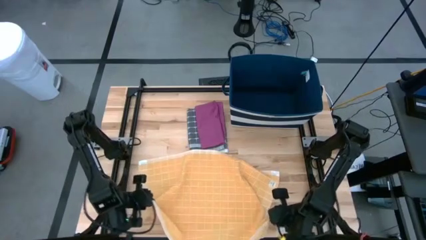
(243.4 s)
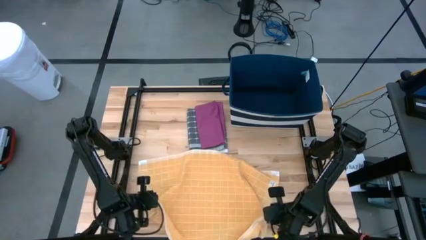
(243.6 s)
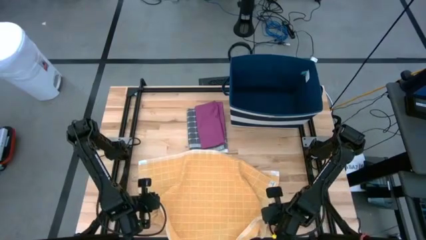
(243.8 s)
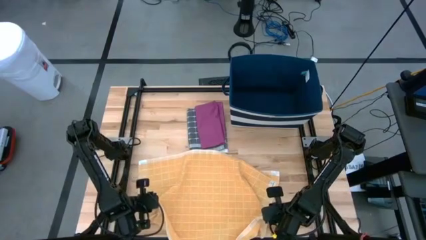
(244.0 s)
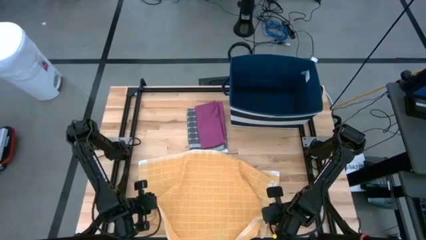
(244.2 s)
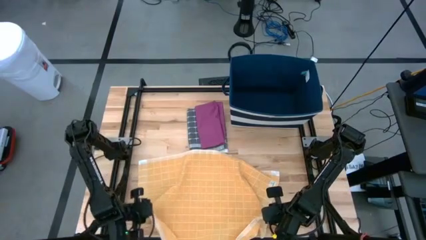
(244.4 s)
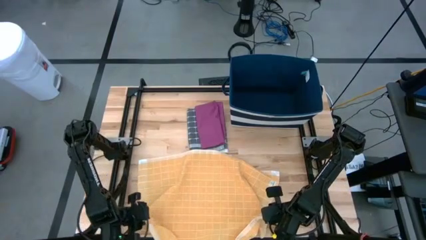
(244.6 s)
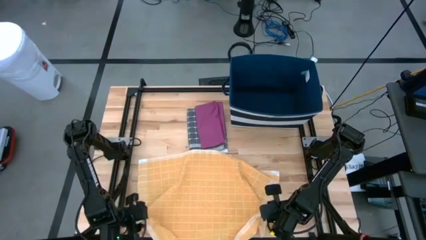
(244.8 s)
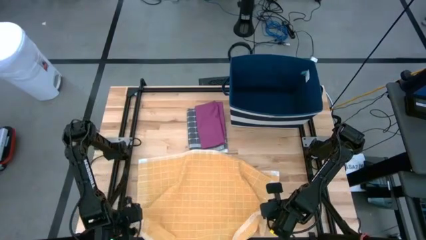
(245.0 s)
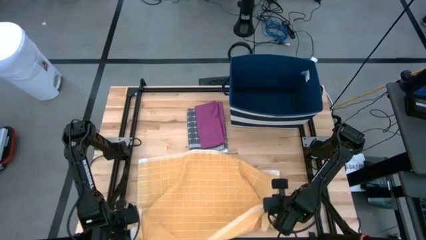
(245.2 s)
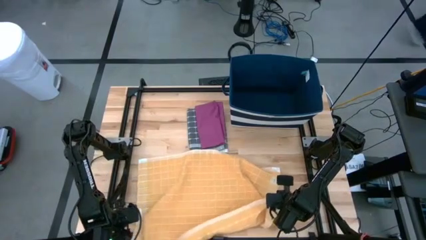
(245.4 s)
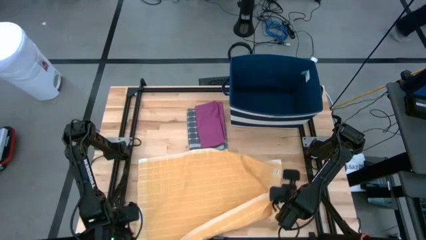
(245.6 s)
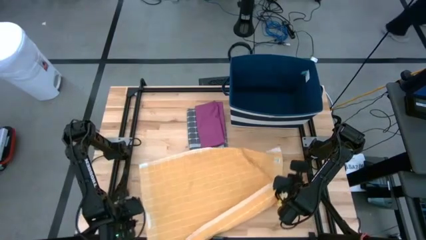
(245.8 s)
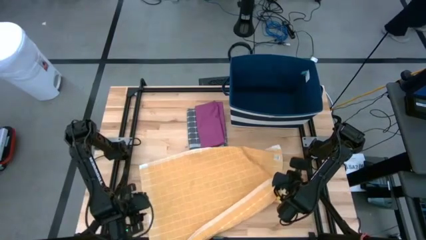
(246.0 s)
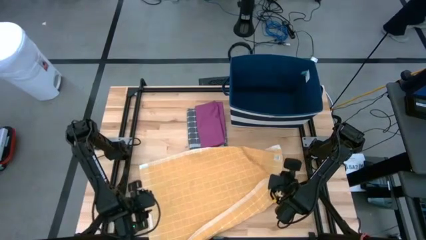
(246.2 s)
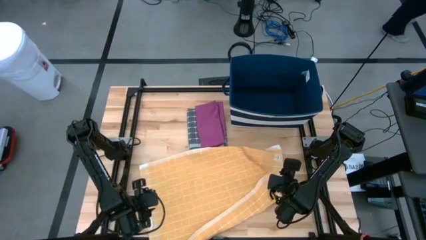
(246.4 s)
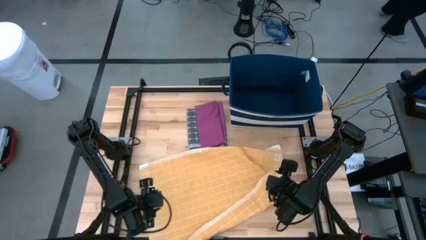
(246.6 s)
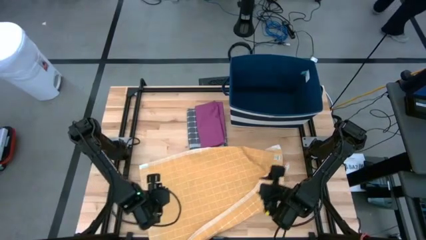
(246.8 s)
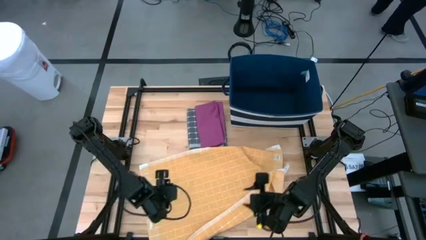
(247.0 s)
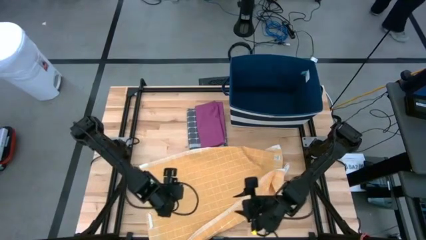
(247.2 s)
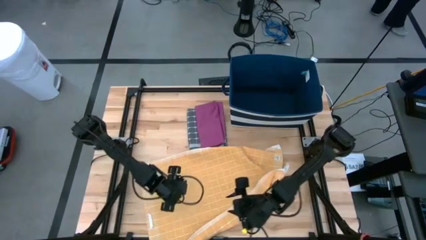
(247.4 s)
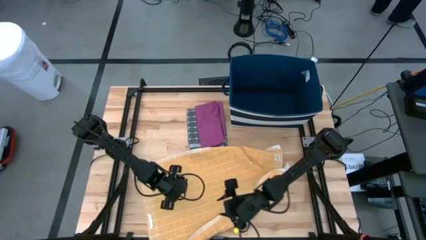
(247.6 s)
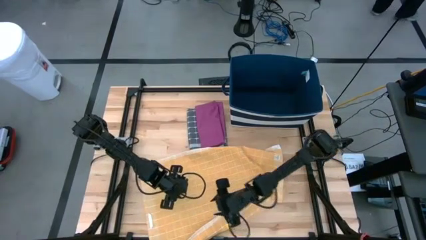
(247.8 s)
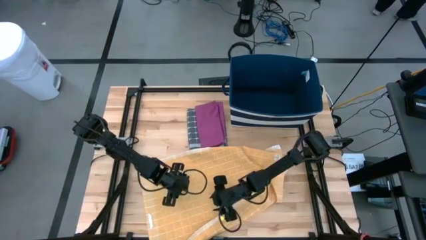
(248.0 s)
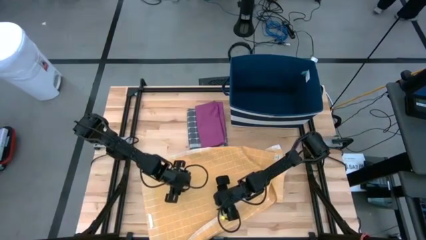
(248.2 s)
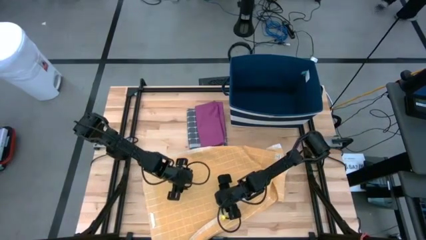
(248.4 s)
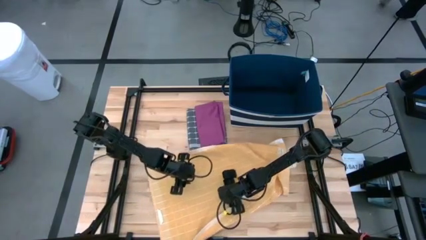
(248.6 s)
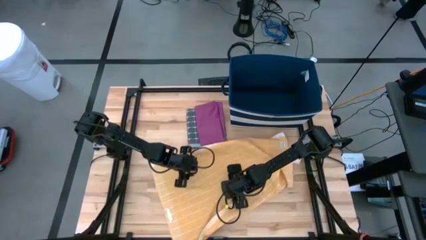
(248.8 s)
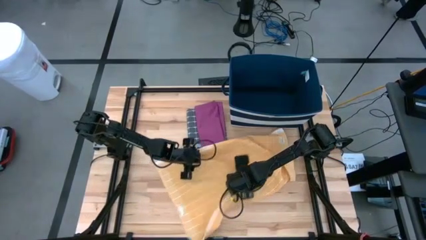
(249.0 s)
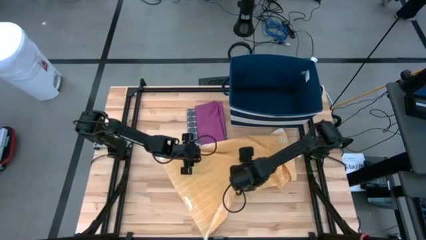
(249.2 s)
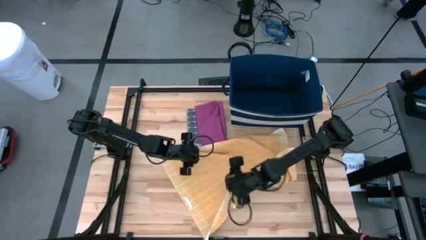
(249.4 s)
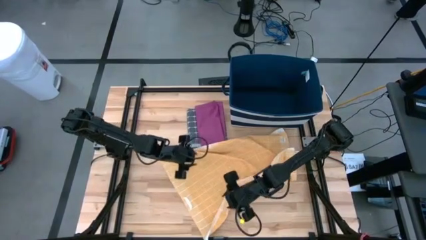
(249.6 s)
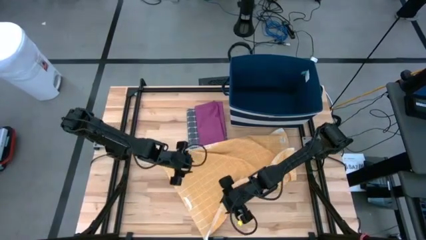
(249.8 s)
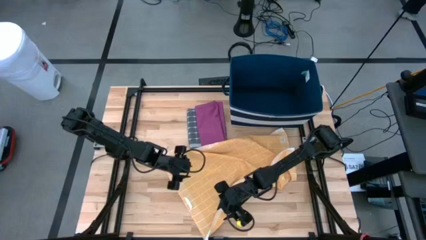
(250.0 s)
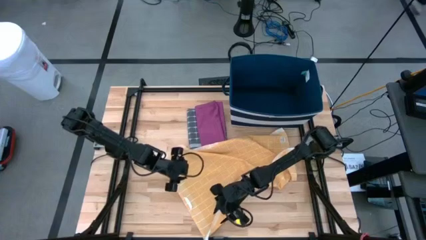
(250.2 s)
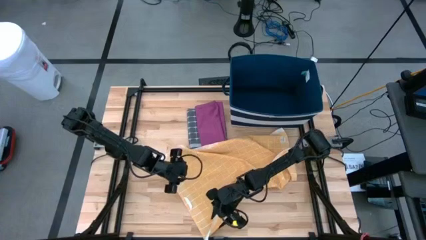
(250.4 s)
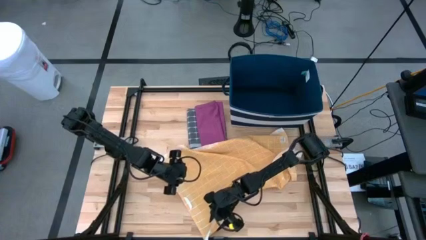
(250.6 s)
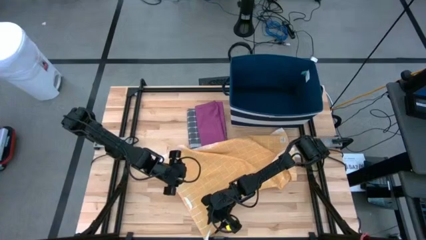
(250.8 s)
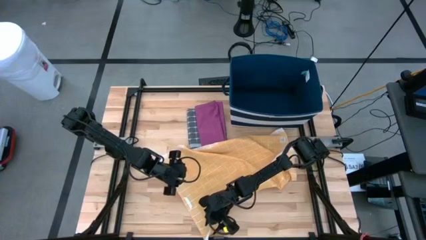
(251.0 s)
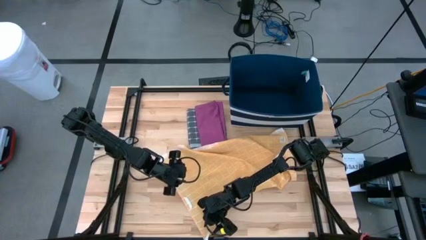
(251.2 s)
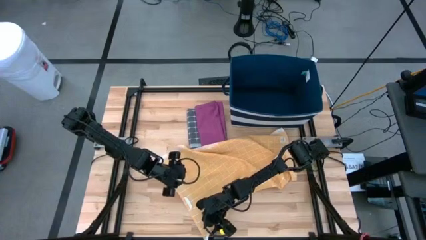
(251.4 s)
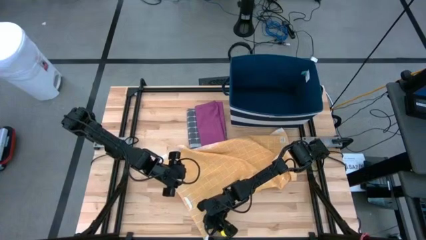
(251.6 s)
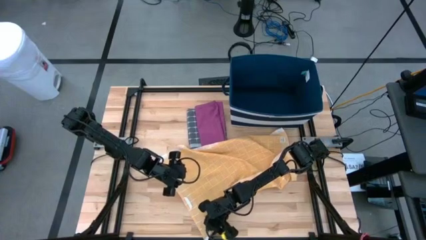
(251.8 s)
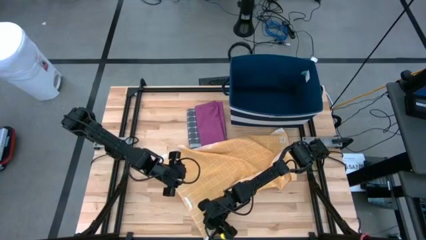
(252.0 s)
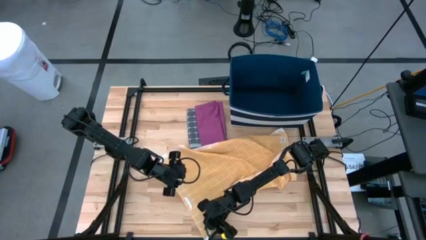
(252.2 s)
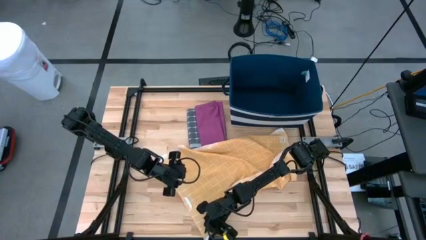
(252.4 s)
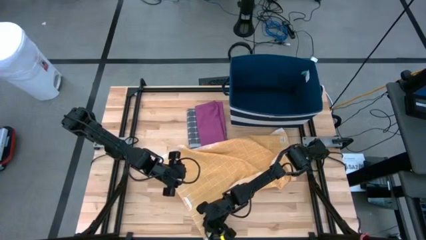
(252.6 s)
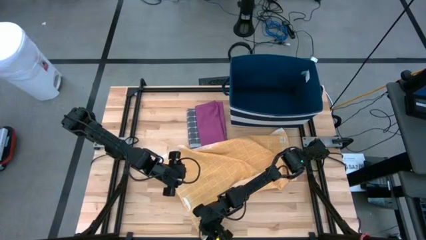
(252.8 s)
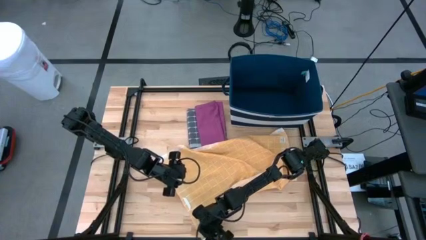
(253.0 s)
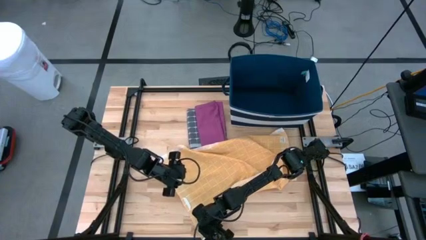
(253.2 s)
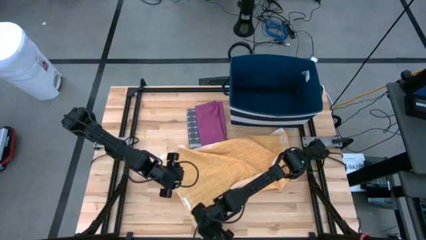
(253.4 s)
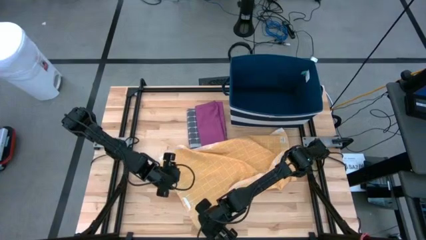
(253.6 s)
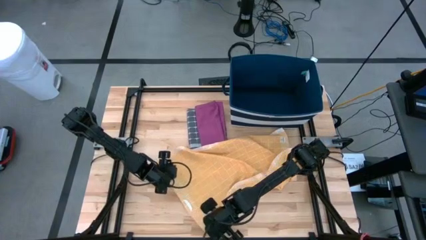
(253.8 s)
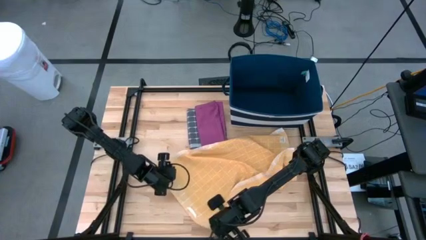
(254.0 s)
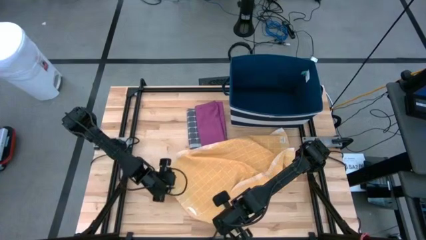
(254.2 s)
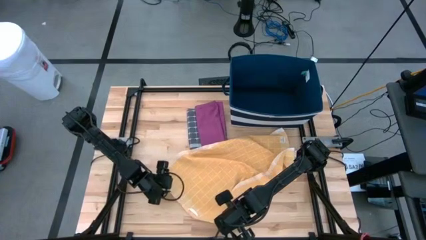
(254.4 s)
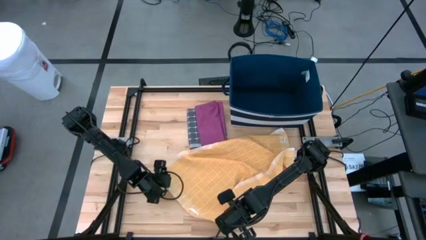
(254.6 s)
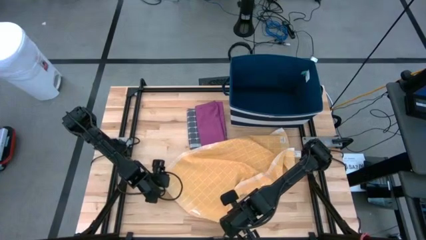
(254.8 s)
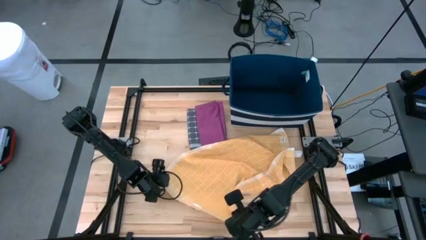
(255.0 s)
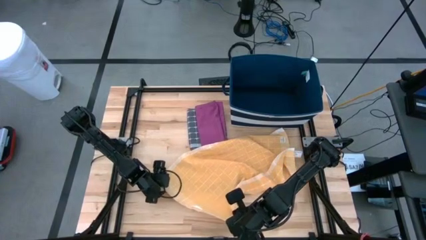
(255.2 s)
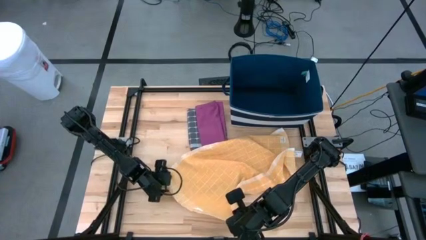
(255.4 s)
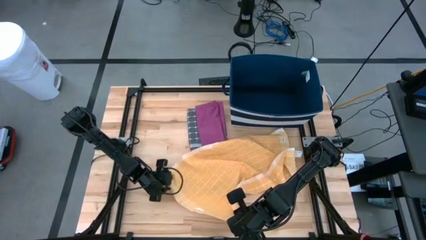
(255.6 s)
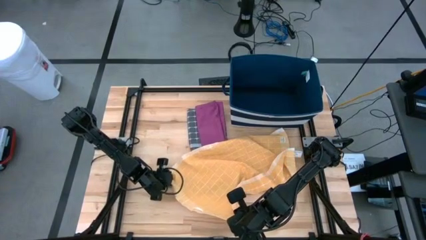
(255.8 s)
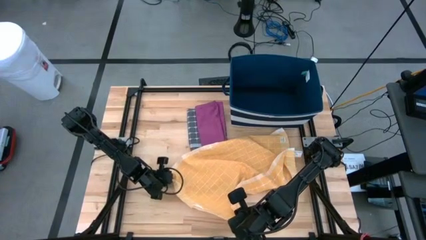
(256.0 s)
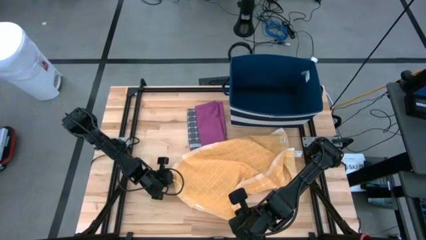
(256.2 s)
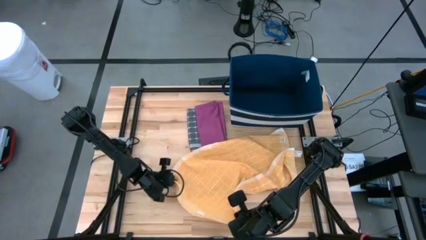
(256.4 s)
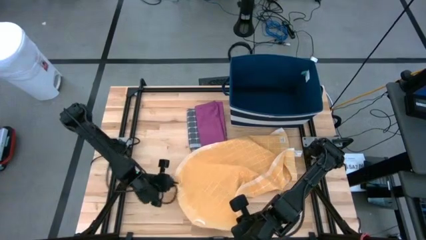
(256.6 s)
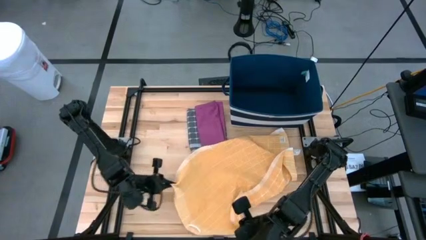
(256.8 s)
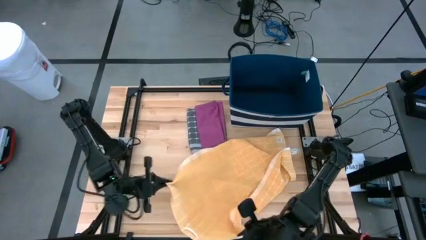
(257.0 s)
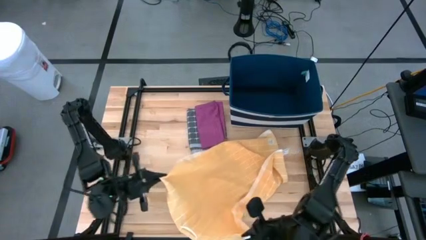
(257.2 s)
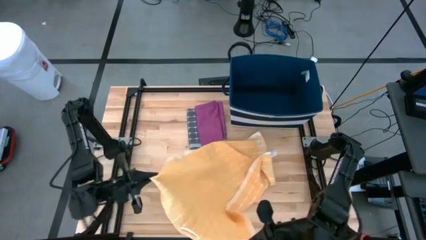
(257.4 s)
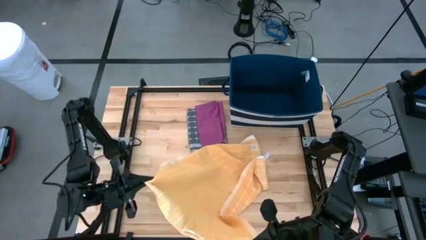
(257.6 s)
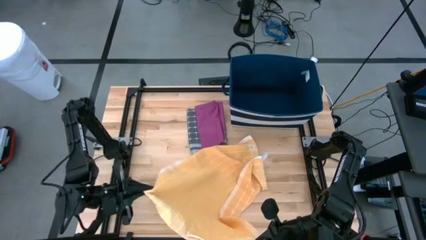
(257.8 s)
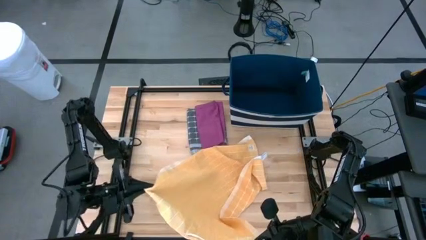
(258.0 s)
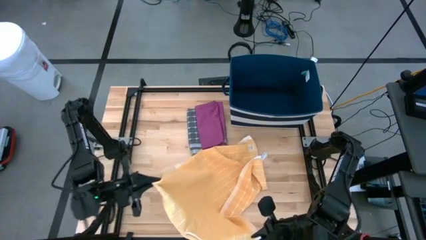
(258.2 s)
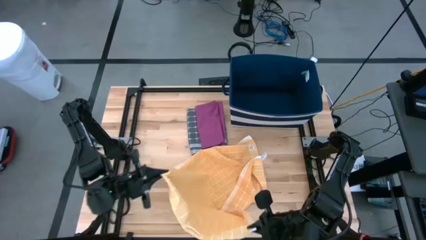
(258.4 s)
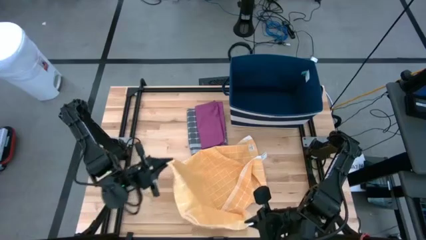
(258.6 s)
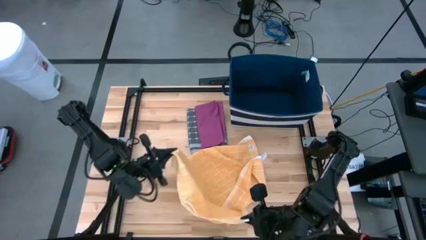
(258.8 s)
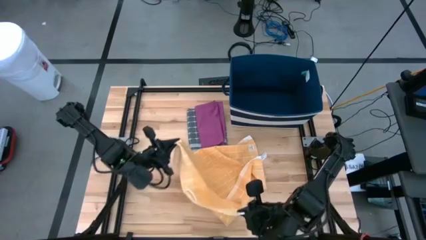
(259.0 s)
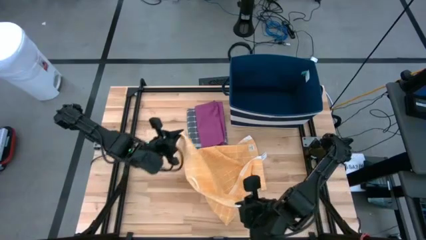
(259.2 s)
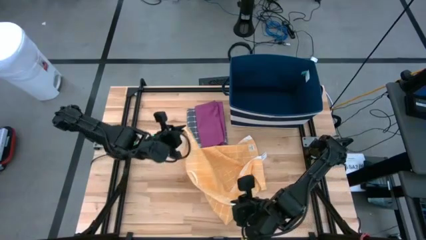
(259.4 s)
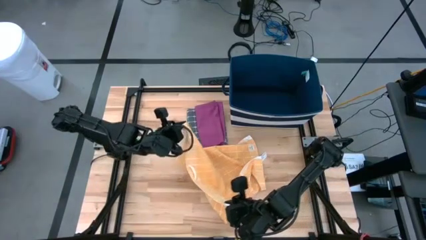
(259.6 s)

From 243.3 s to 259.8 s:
Task: Fold towel
Fold the orange checkered towel
